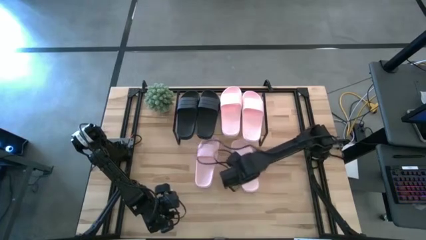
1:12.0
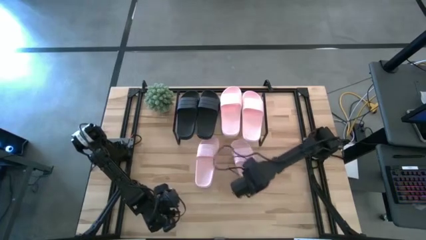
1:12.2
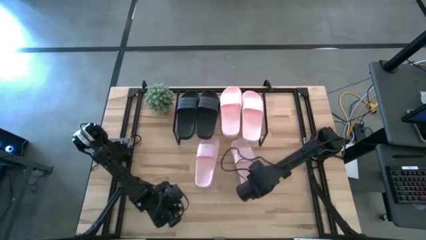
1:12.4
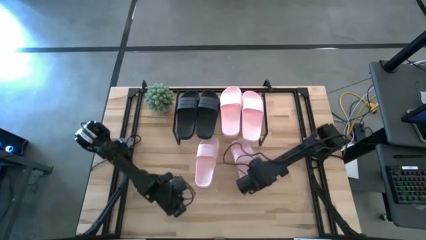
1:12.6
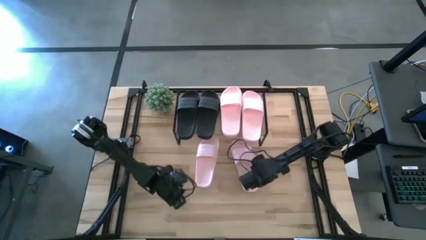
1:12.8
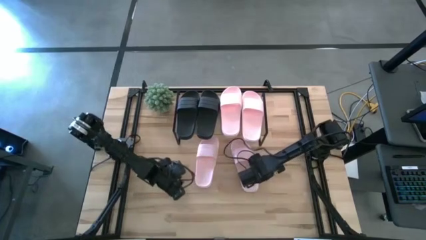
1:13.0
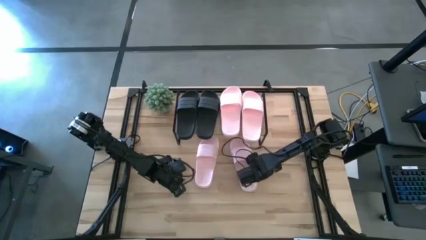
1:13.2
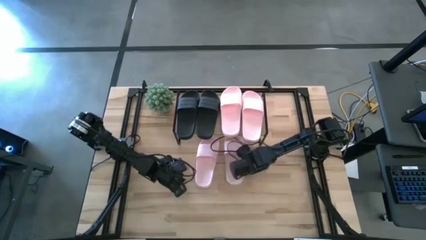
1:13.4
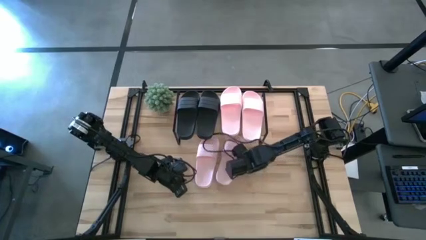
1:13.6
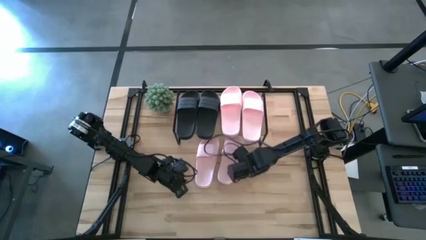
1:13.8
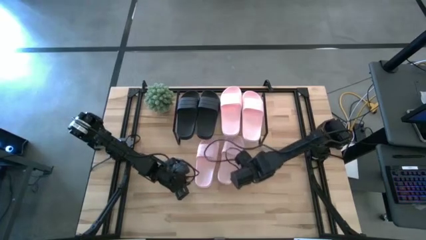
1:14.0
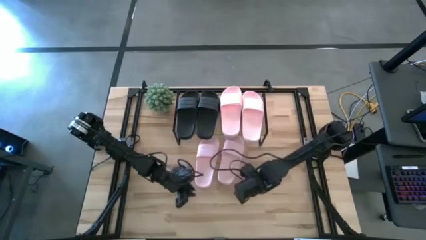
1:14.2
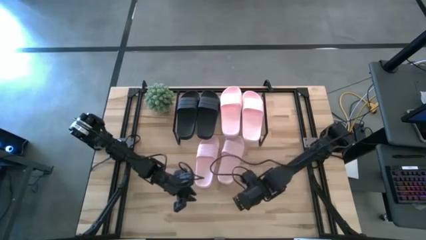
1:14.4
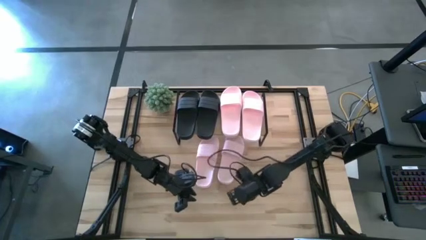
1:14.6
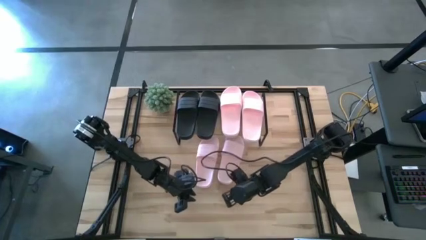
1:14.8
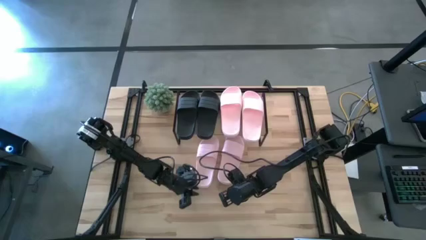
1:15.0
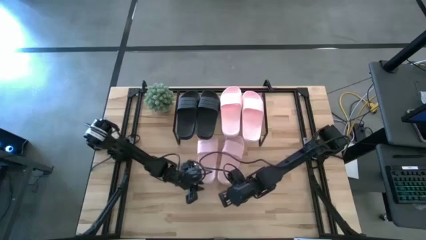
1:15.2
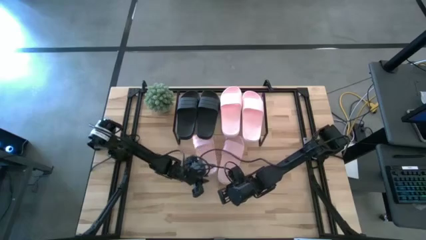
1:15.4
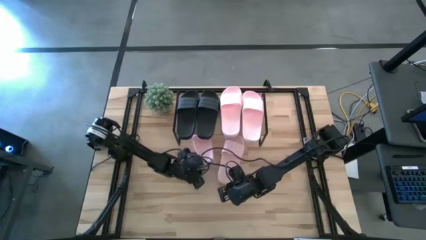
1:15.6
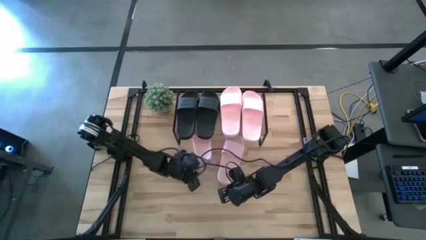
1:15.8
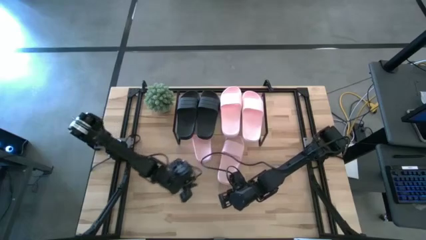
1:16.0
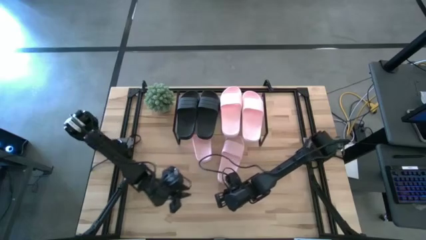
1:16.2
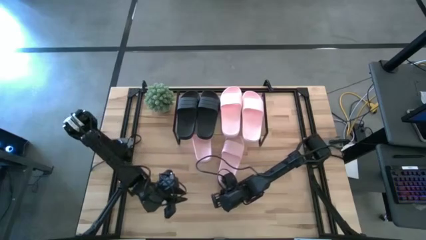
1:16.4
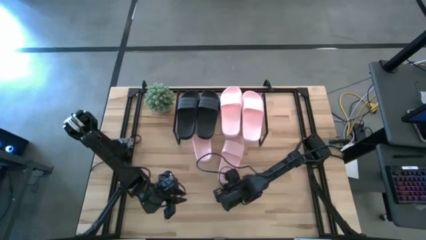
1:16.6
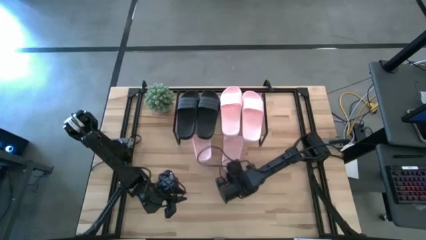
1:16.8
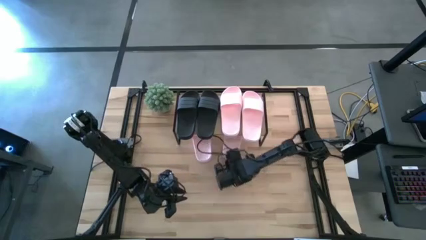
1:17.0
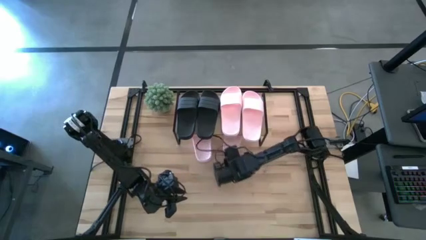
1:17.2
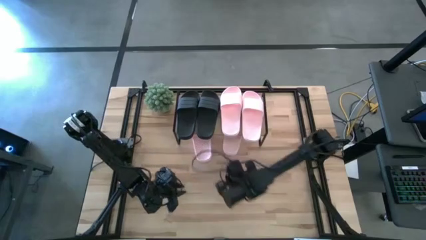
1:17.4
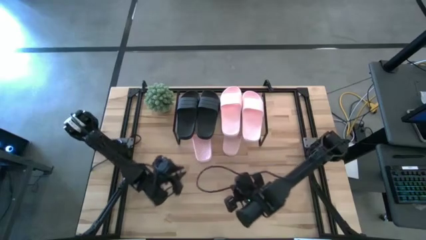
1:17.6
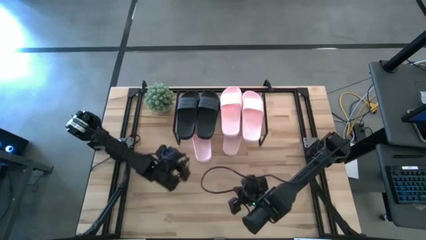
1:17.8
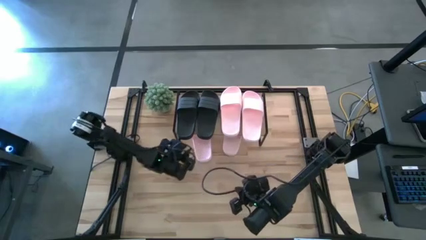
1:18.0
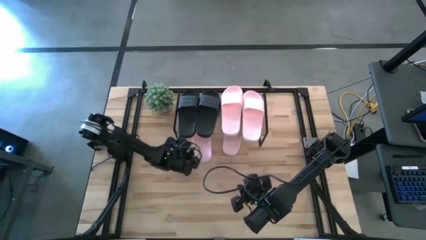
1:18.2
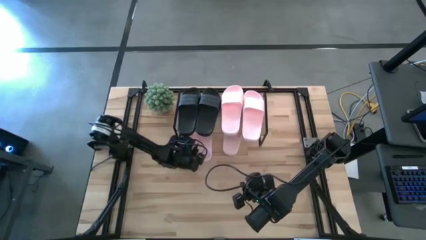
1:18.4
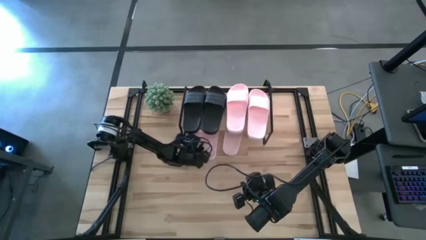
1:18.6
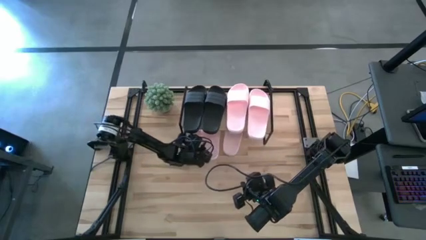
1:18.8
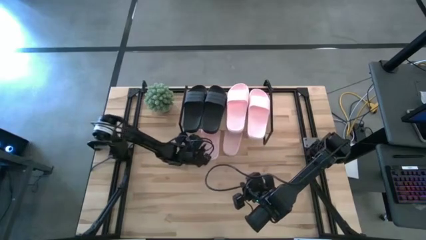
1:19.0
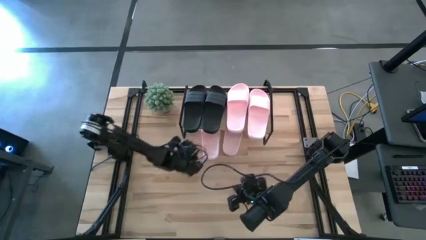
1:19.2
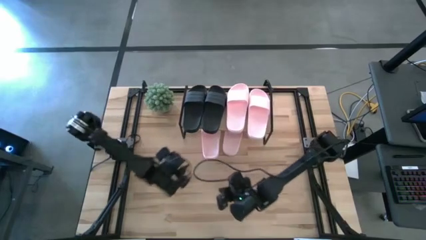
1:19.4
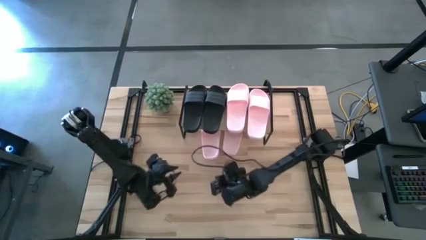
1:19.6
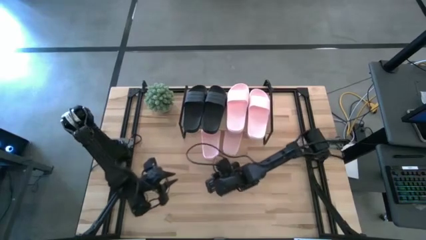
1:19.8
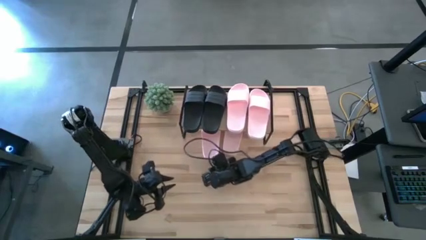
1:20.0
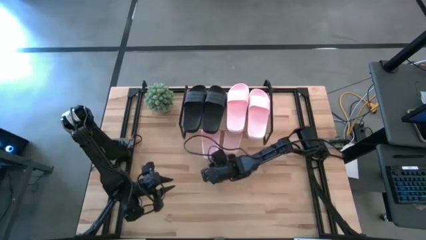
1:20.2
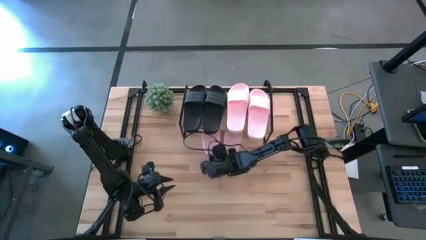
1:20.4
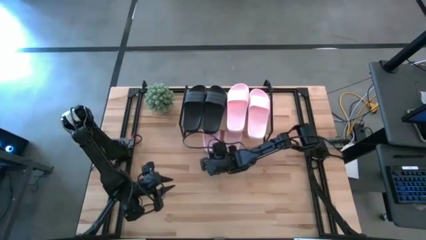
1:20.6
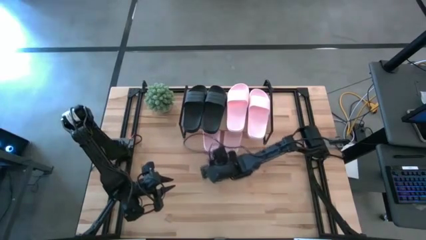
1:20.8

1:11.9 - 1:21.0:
Task: Pick and place slides into the shelf
Adjust the pink slippers under the shelf

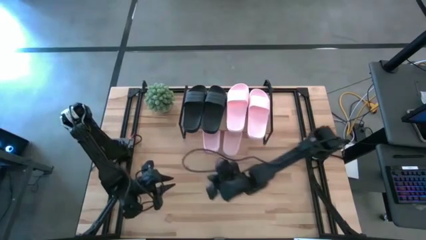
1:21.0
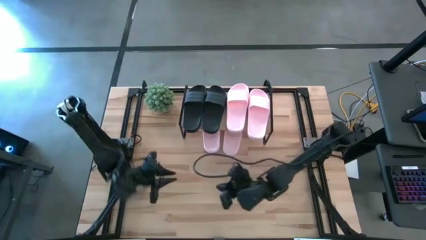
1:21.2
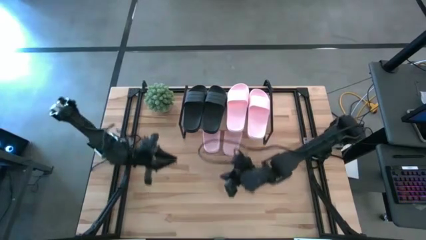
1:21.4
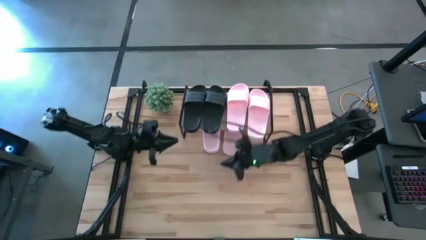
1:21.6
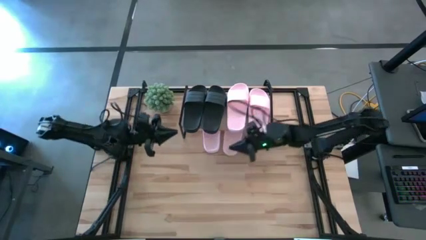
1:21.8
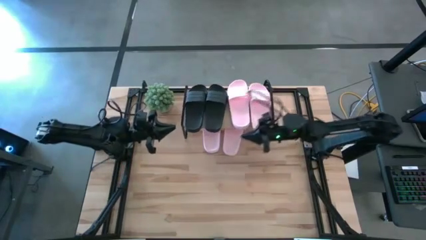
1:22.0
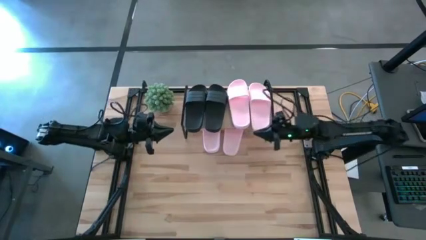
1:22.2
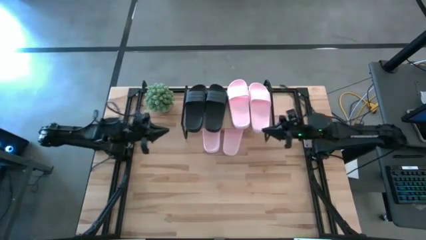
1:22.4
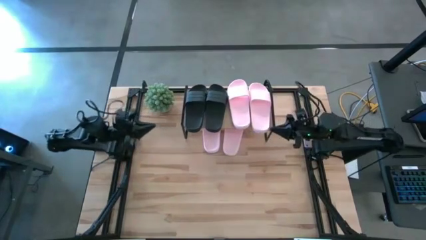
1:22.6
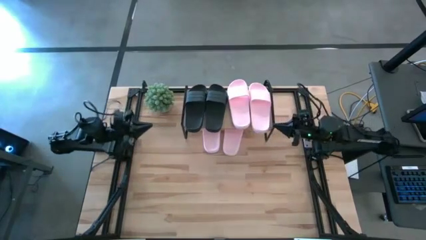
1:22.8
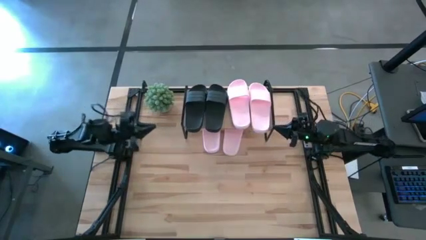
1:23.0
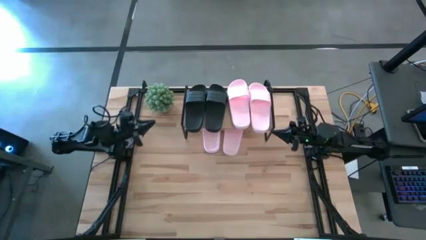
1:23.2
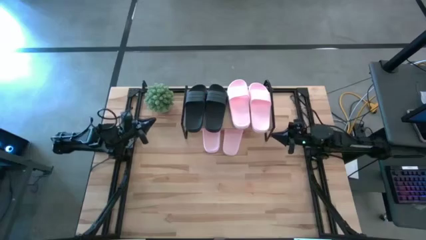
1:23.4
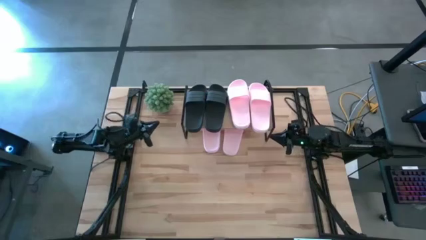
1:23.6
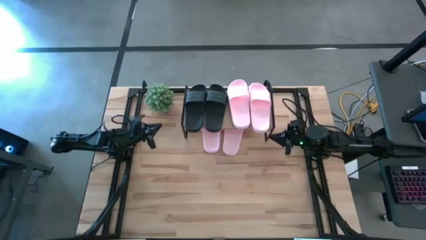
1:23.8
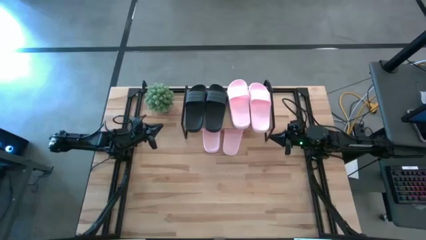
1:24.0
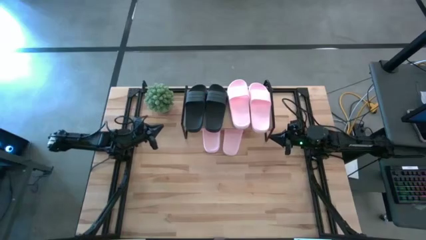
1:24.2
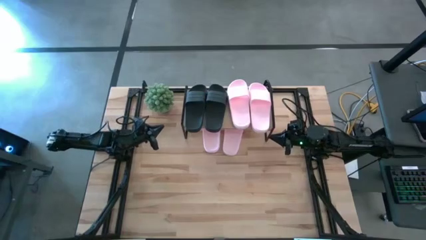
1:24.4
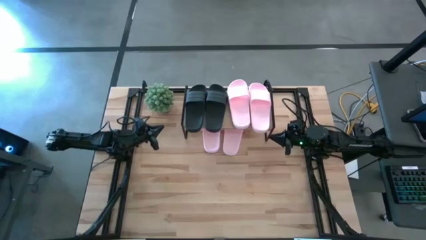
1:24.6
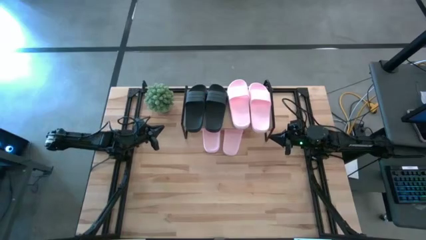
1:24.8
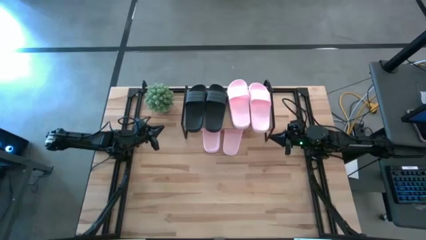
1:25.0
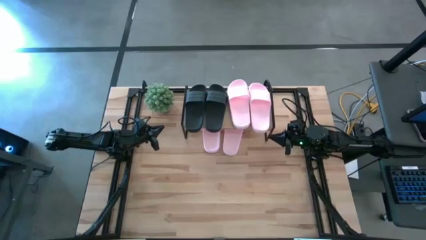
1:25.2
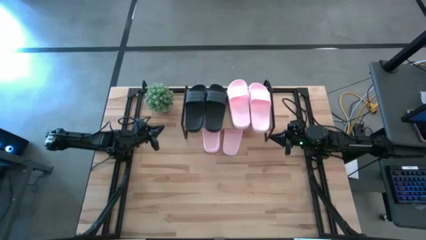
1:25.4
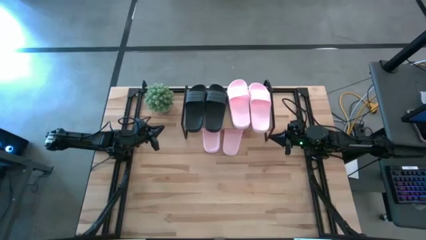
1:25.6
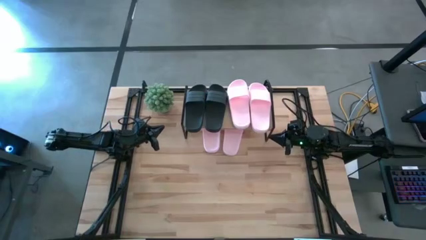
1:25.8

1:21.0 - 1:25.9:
Return to Home Position

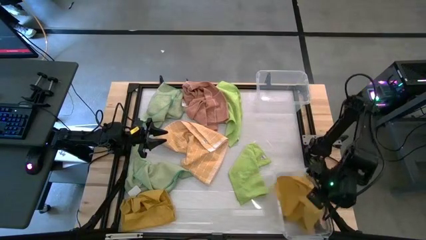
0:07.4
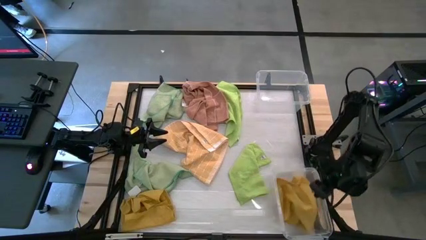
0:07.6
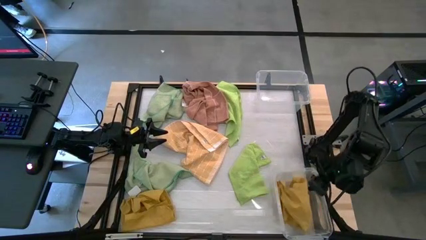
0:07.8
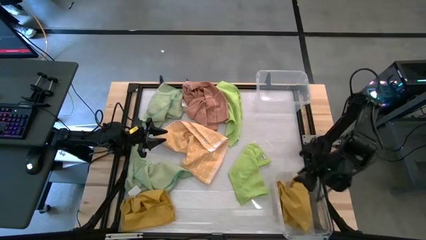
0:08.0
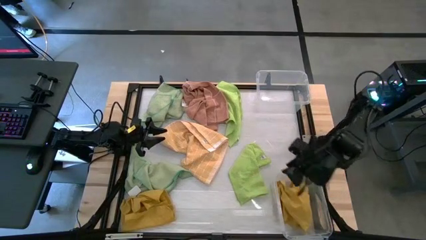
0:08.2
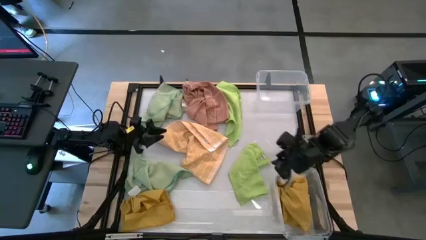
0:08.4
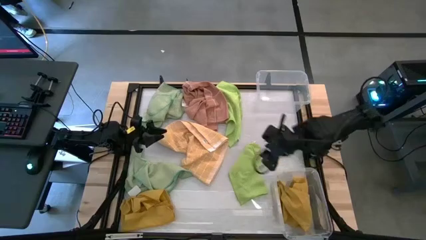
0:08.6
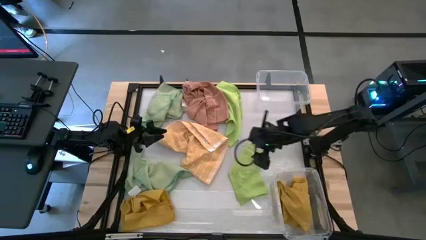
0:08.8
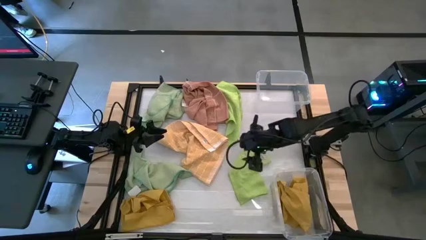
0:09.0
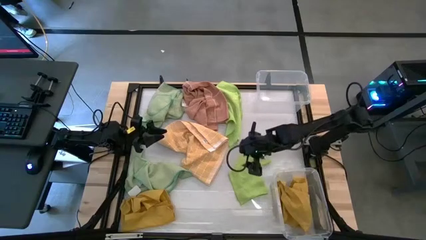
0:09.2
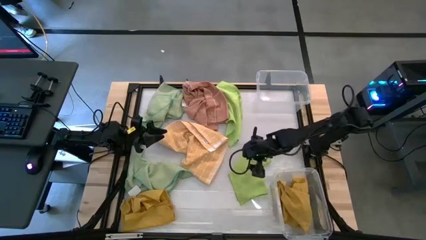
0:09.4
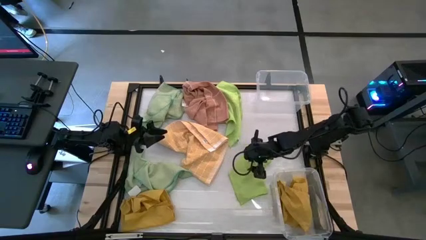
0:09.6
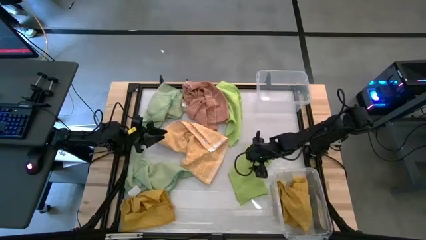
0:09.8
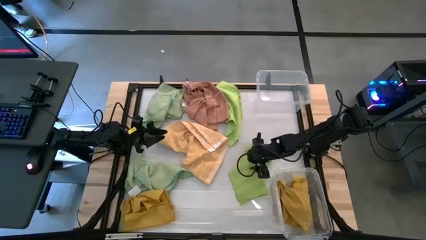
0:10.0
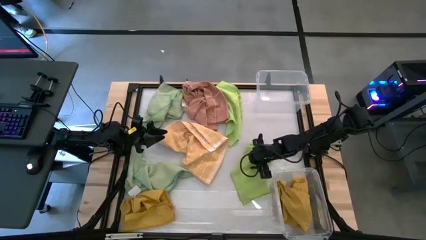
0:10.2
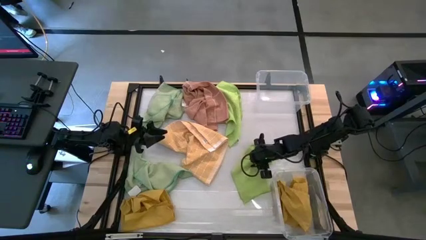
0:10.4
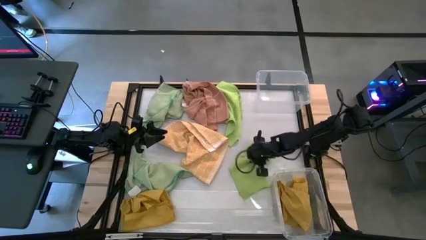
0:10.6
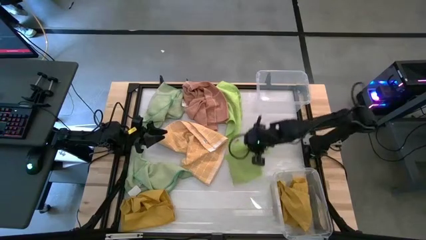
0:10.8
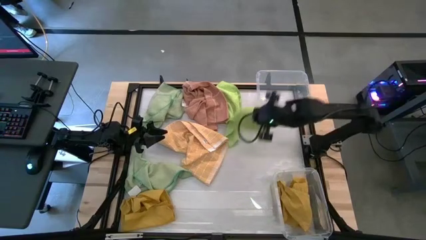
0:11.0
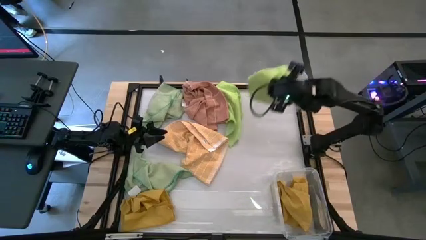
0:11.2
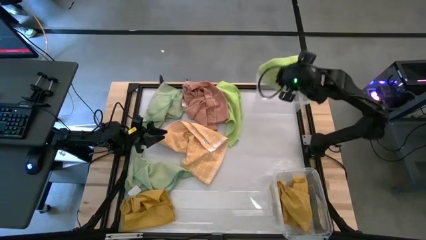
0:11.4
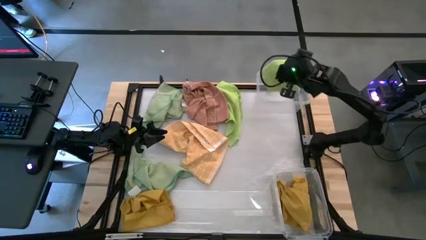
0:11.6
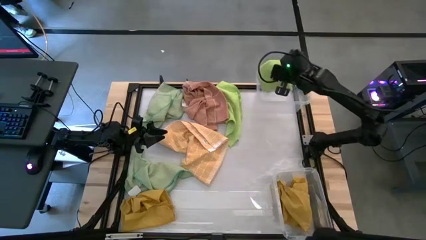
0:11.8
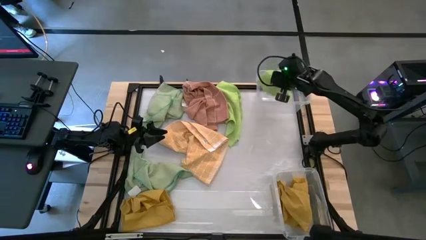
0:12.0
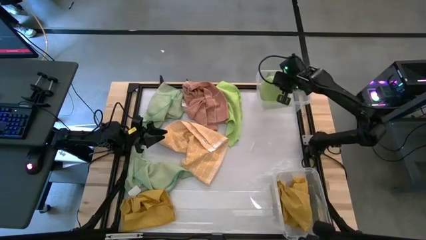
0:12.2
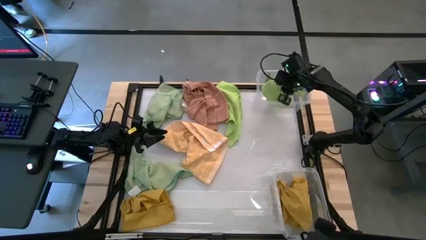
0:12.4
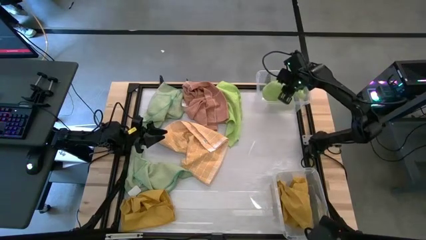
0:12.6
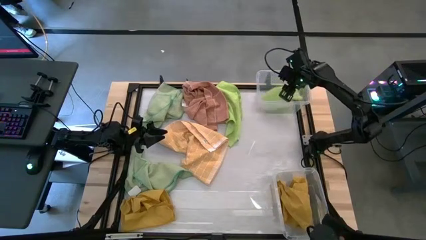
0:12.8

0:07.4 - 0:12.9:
Task: Sort towels by color in basket
Put the bottom green towel into the top transparent bin
